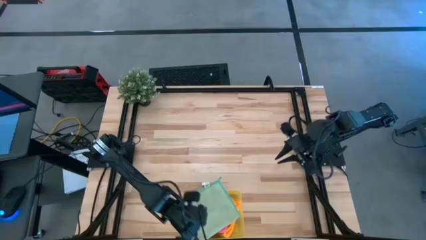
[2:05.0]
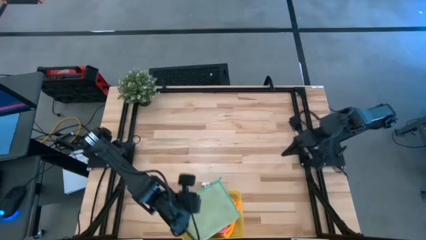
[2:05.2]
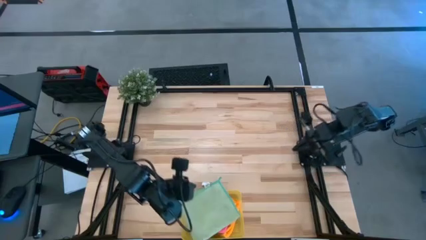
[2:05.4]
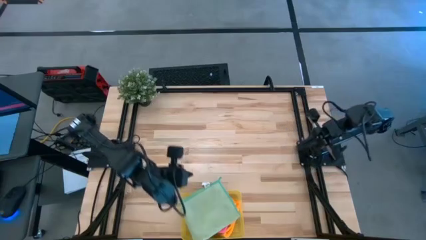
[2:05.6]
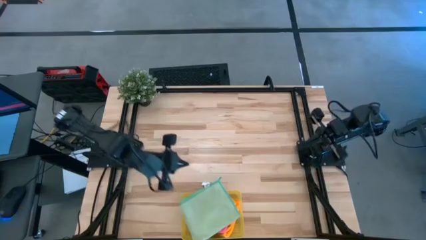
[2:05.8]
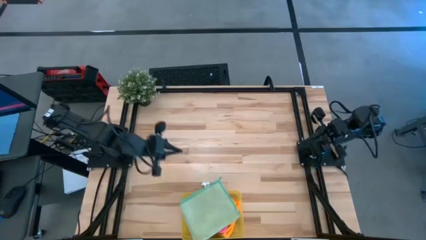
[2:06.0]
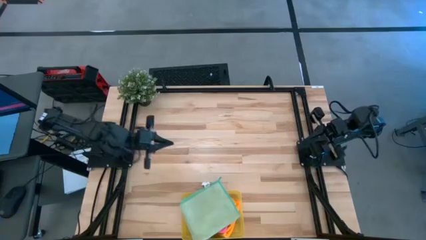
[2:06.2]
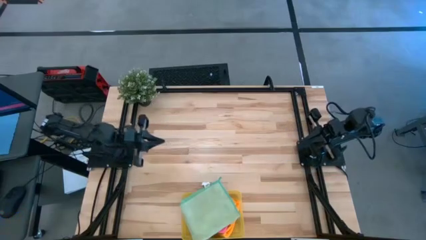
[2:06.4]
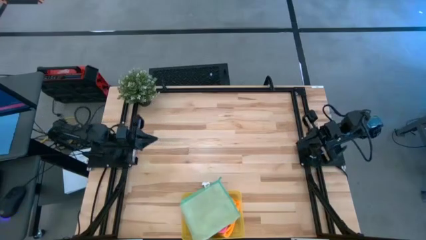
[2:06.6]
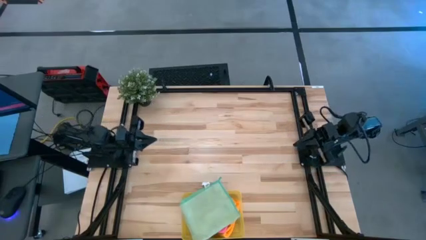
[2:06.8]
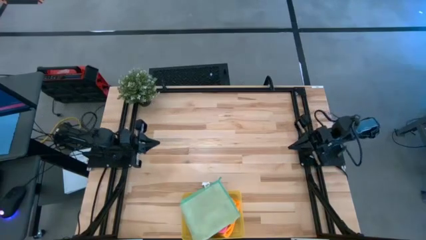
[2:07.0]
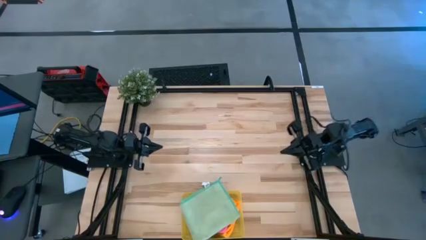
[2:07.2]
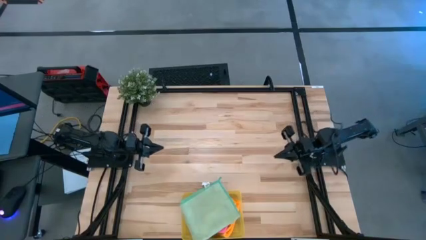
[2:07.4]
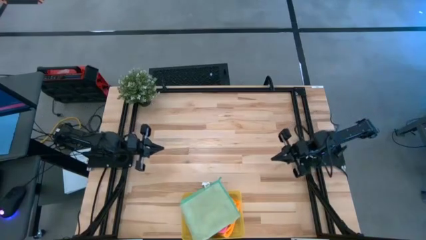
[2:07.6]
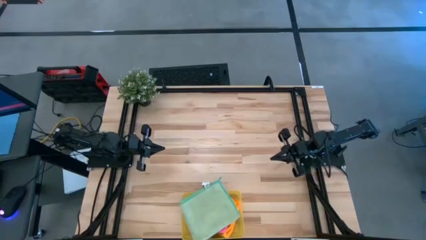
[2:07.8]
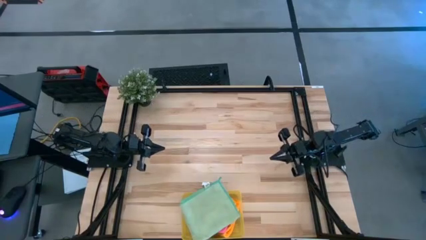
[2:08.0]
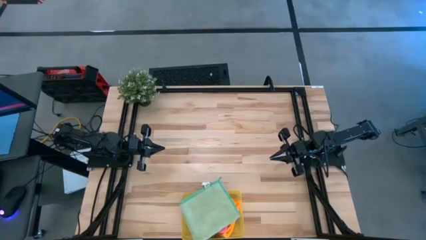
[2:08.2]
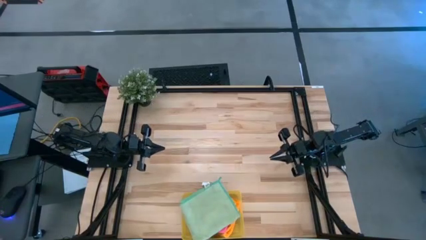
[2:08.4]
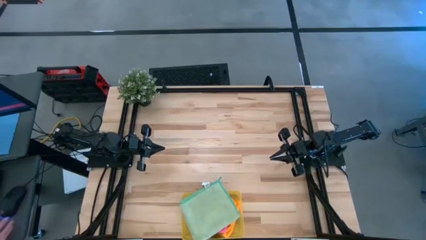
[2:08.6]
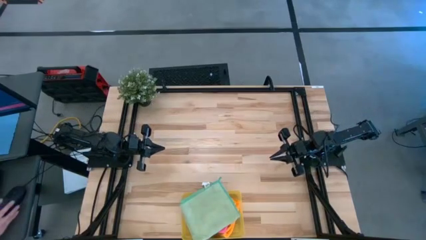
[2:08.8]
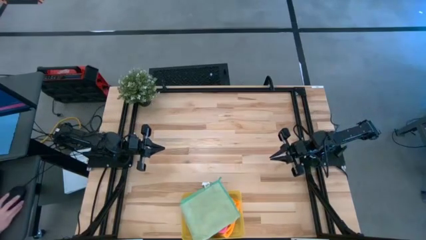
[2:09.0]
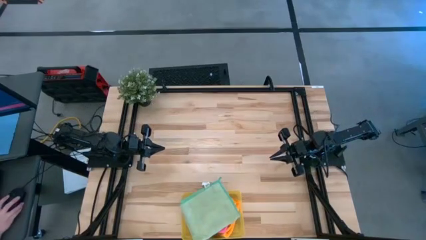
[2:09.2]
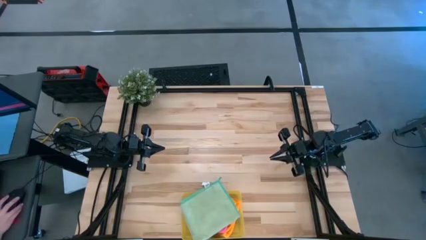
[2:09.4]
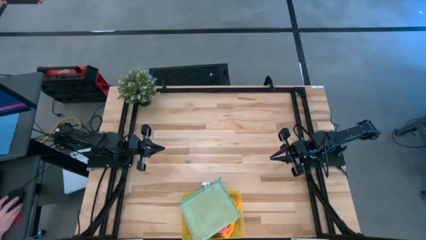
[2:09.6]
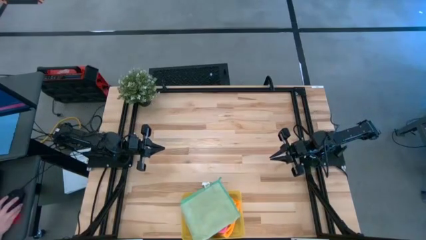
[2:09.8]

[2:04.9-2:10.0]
Task: Fold microfiber towels
Return to Home Position

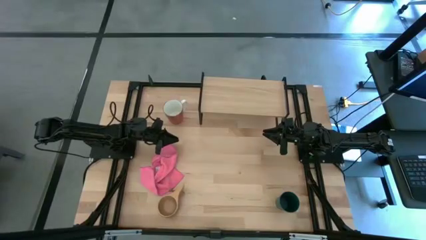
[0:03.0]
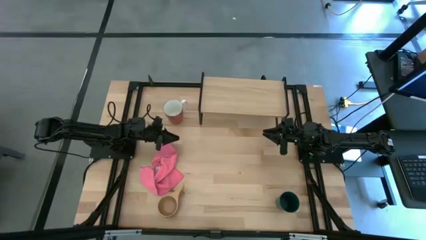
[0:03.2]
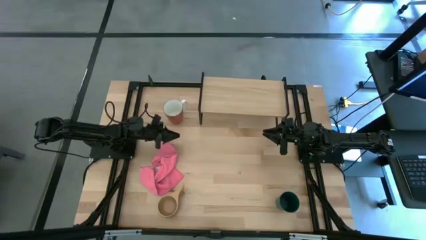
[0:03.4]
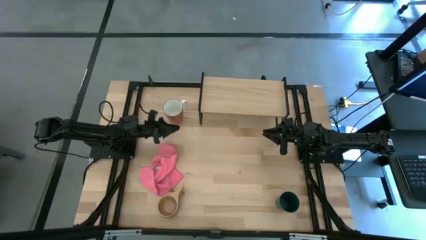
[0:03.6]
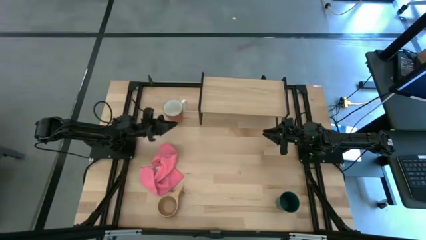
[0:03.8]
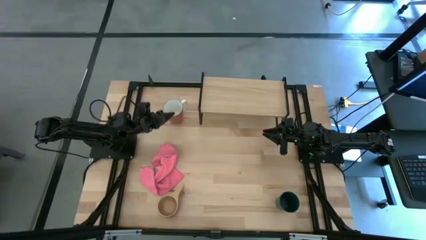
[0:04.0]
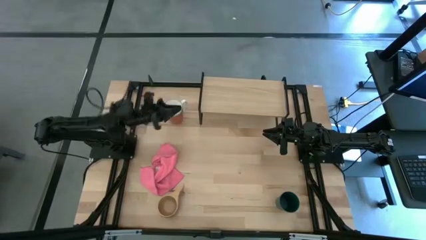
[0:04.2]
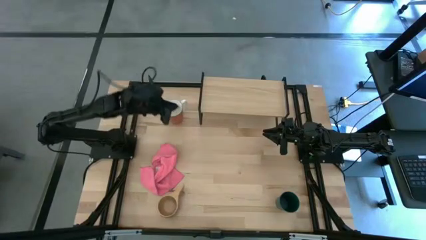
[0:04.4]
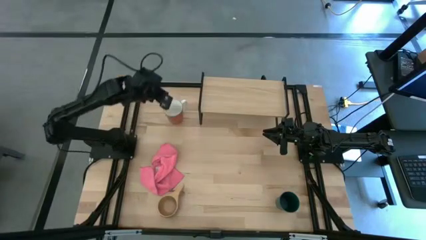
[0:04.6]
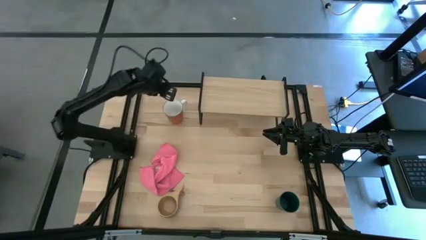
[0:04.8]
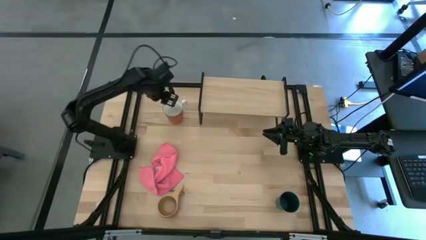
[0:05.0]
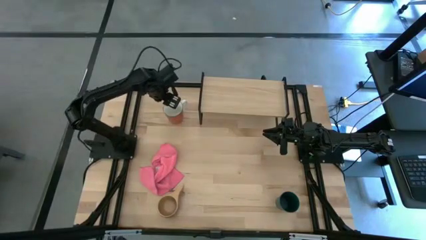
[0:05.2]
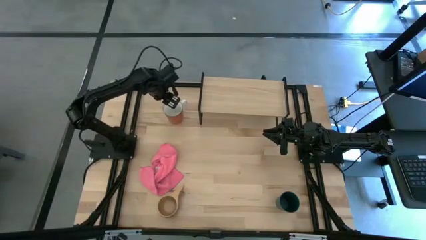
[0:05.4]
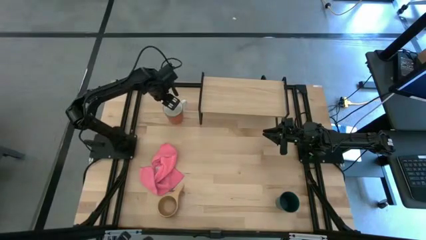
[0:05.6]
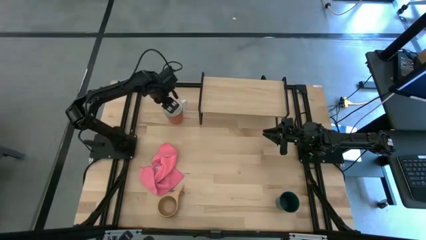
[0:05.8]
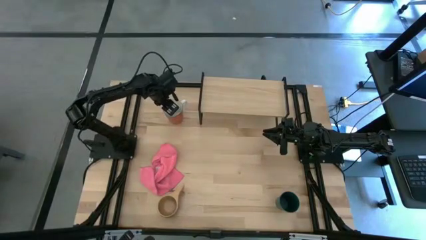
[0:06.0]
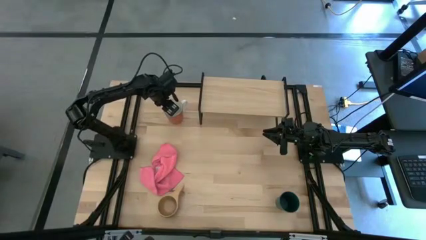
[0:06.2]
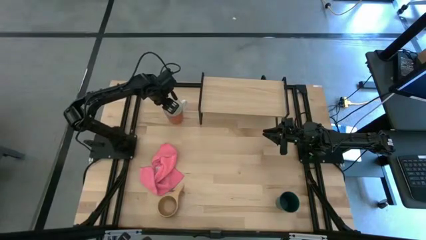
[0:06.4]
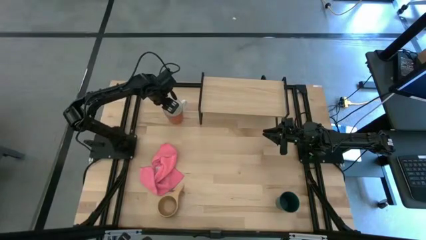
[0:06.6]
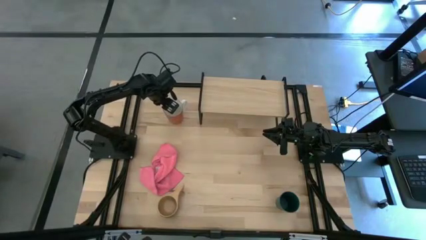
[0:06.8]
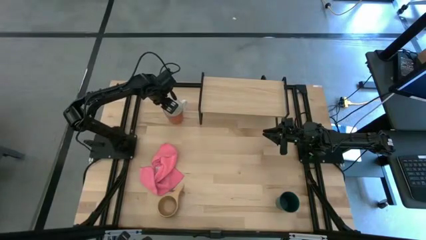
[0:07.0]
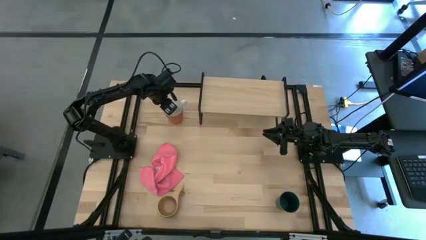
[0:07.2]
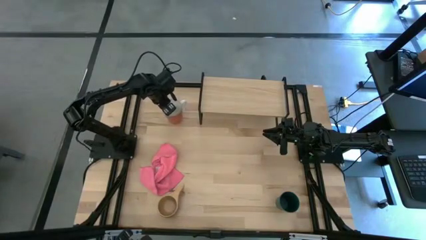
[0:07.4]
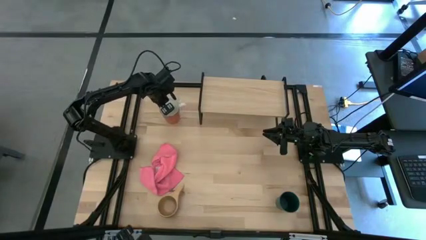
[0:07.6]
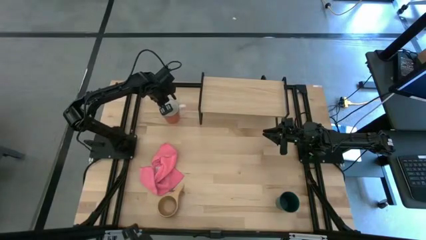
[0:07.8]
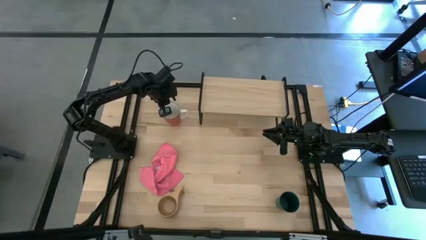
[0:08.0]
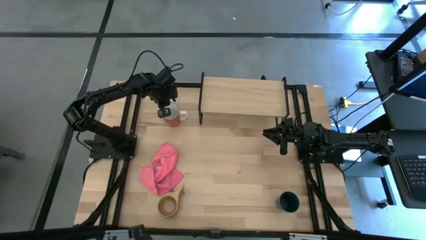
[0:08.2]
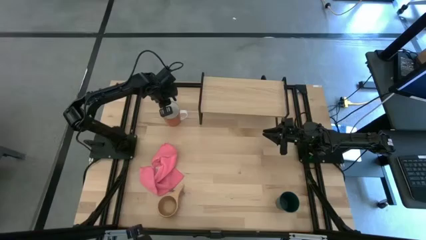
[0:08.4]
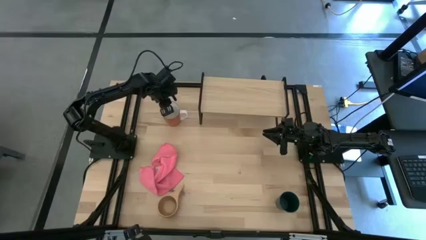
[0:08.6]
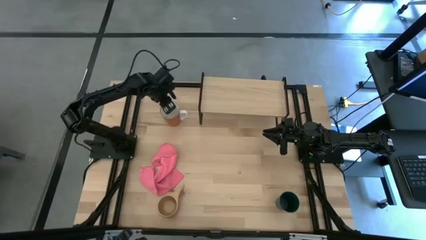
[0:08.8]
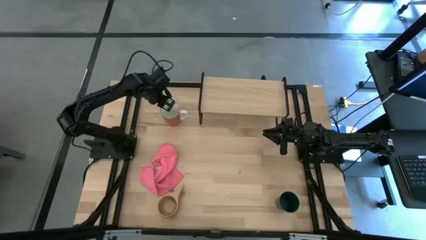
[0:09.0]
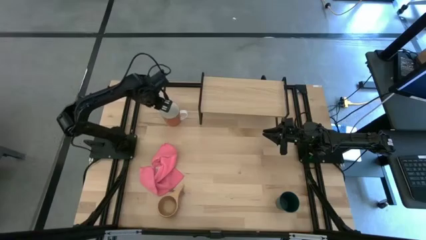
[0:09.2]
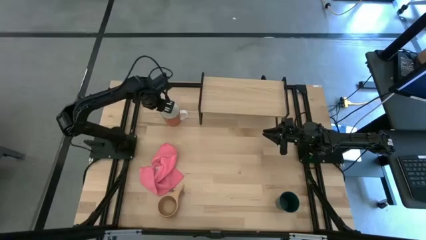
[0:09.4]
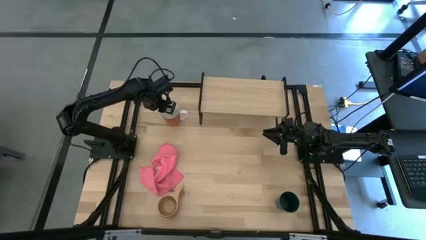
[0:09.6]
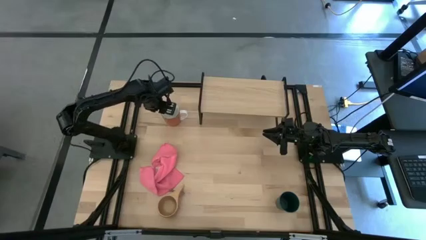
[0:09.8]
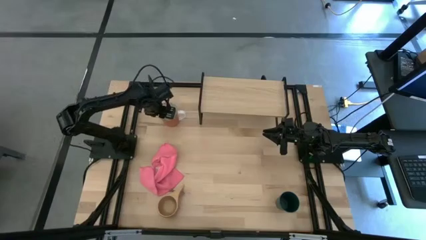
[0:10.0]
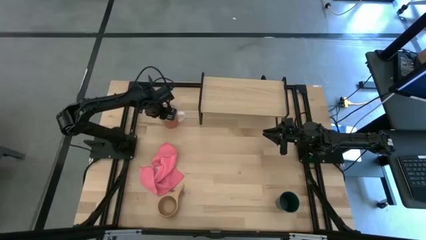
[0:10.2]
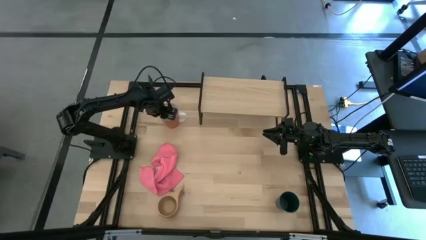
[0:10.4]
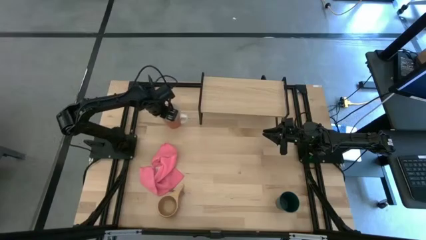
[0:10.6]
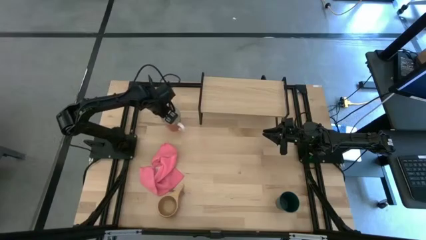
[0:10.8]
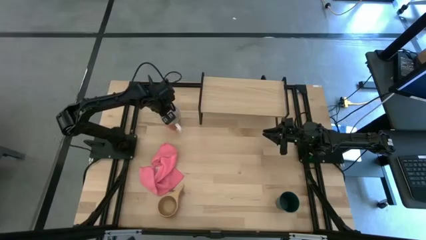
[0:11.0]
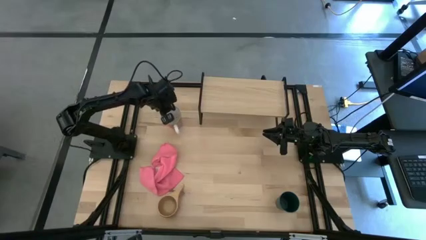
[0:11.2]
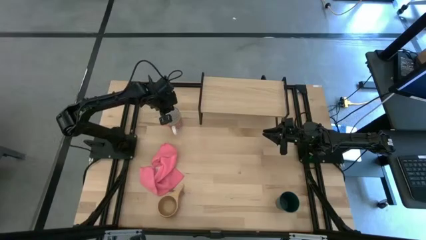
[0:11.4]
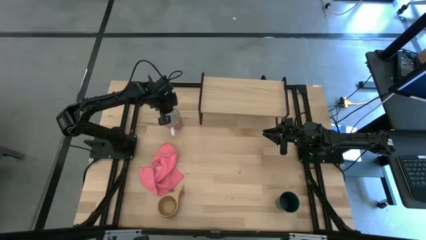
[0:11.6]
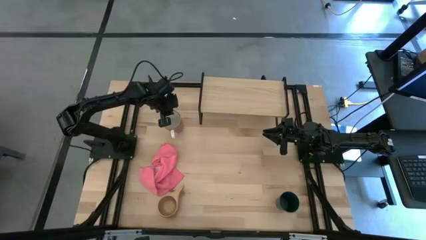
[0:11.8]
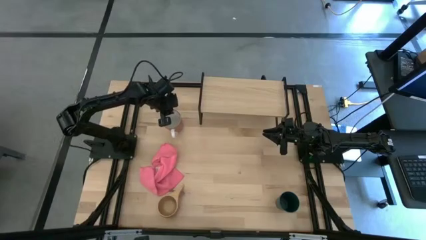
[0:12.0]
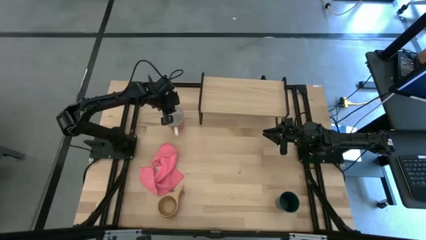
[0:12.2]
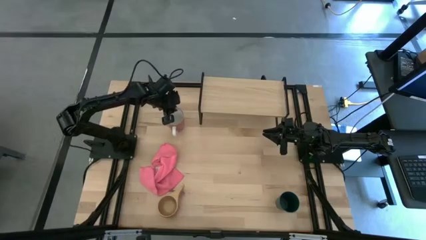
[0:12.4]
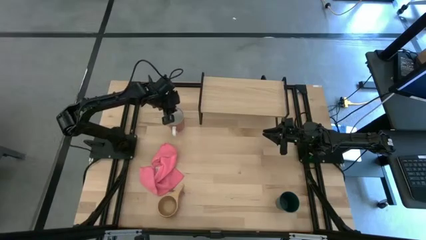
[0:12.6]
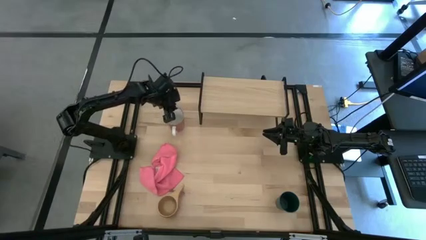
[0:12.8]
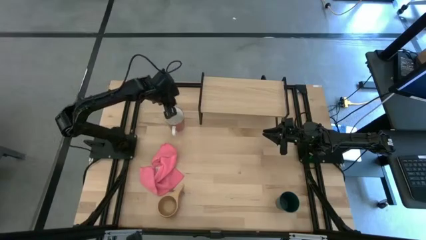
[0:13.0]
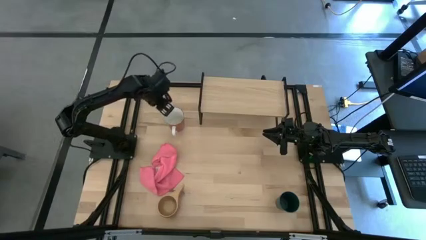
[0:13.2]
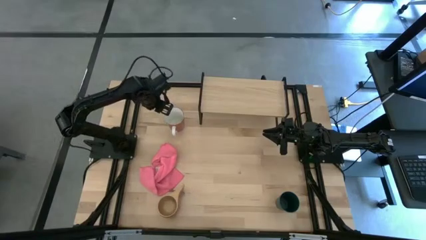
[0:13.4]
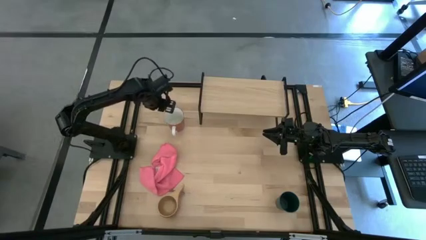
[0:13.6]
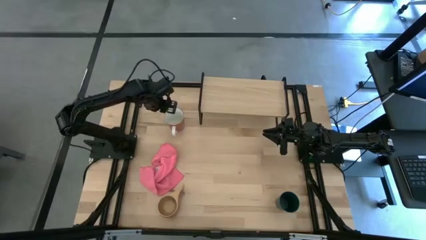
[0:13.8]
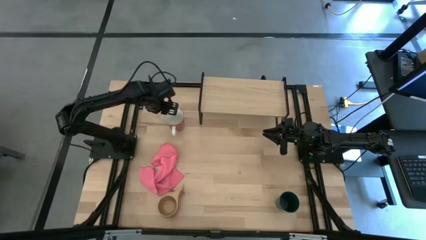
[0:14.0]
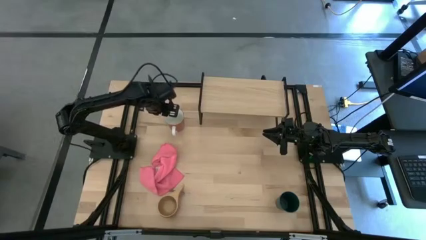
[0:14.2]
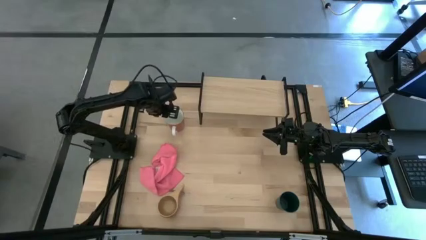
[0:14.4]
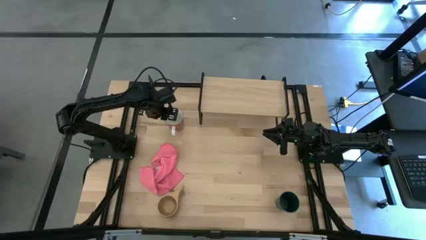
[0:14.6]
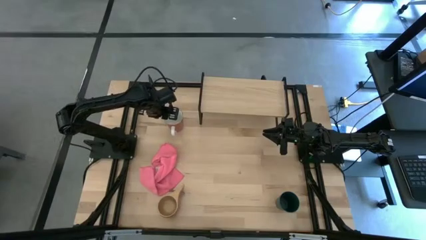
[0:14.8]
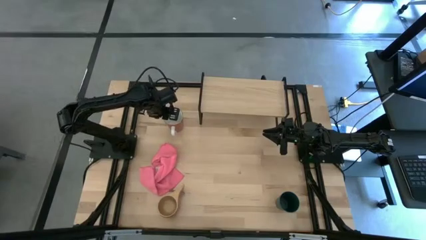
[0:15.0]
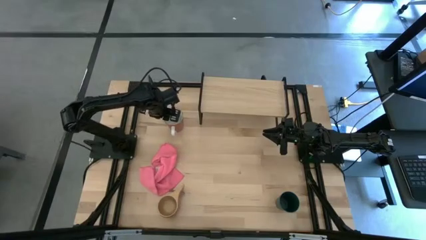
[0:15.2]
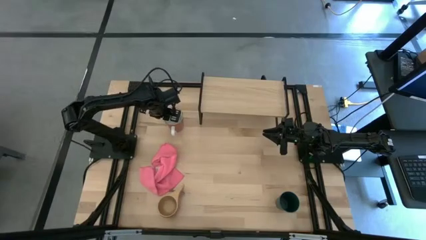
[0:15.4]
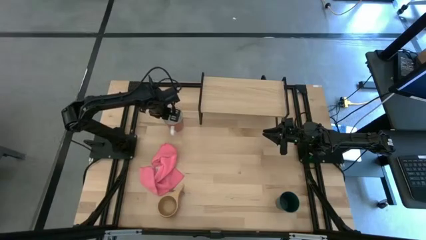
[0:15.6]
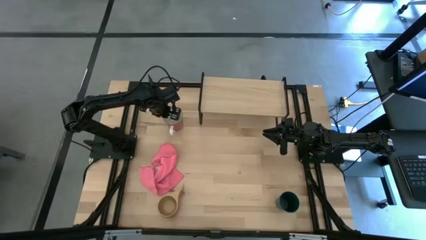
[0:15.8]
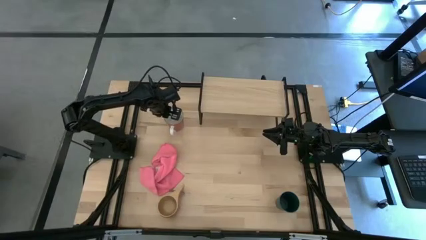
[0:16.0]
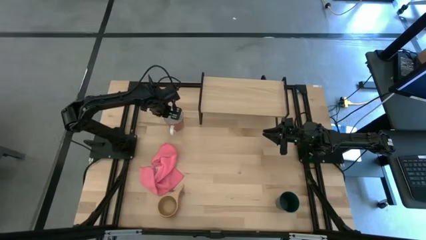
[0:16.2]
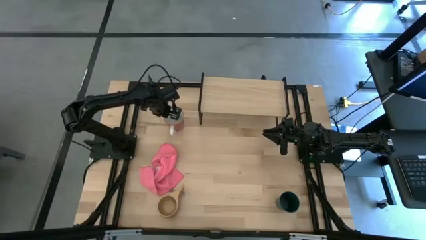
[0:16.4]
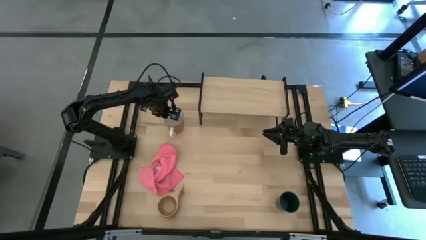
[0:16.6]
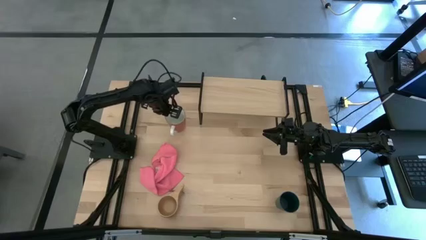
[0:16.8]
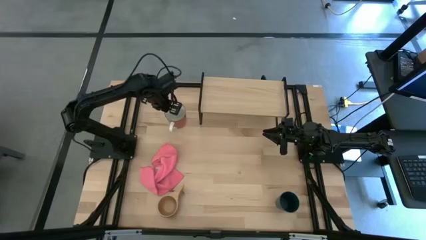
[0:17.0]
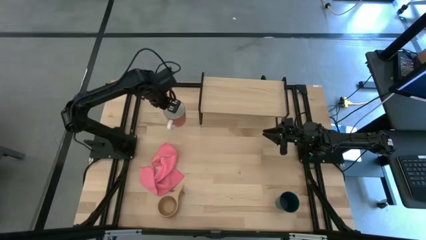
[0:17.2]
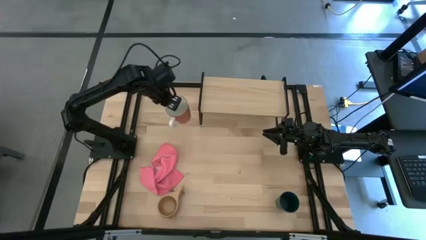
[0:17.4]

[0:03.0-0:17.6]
Task: Stack small to large cups/mugs on shelf
Put the orange mug on the shelf
